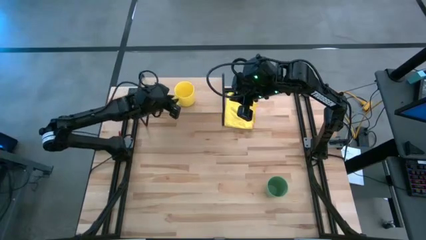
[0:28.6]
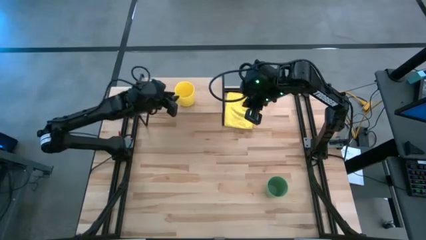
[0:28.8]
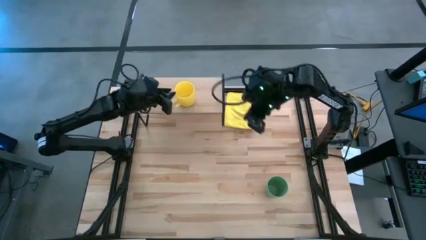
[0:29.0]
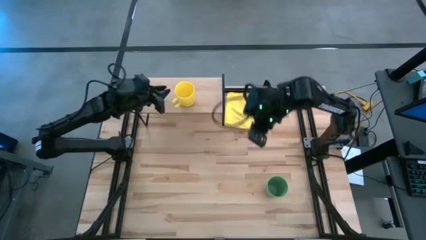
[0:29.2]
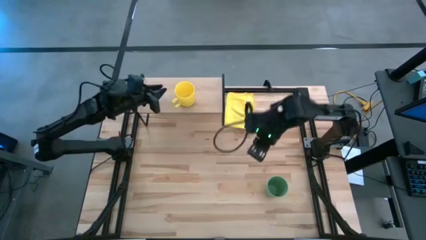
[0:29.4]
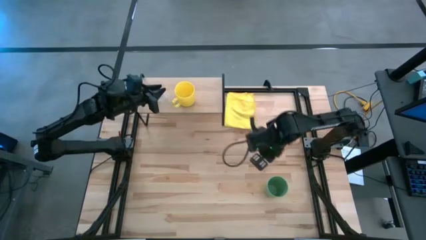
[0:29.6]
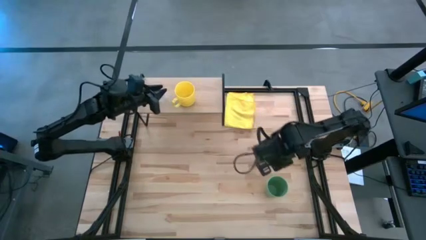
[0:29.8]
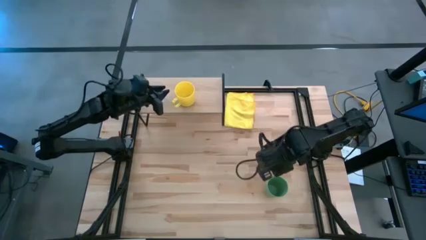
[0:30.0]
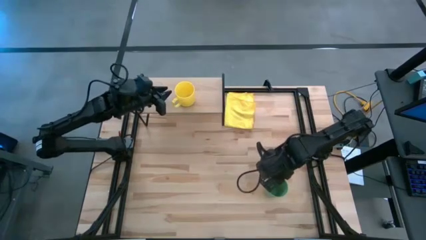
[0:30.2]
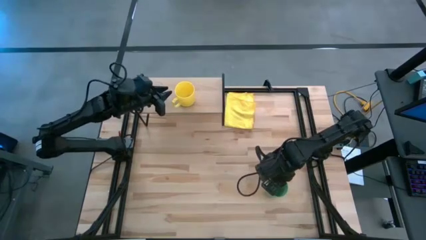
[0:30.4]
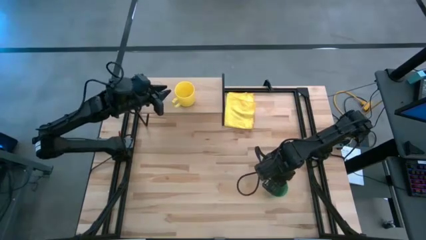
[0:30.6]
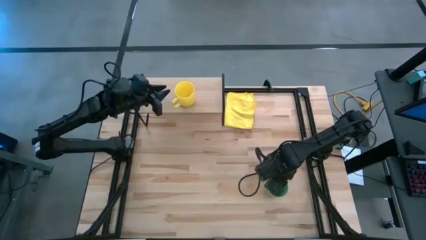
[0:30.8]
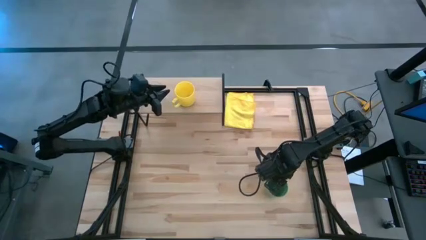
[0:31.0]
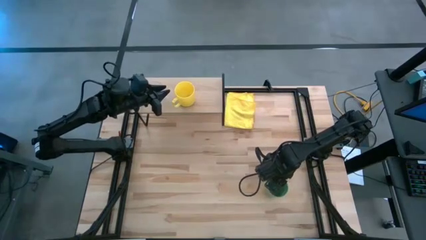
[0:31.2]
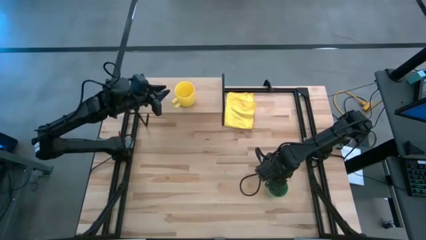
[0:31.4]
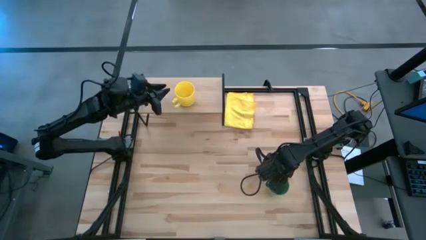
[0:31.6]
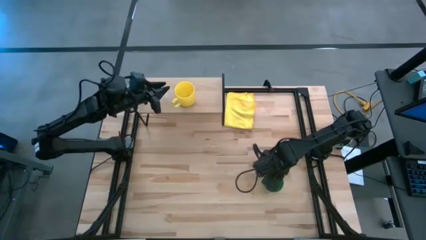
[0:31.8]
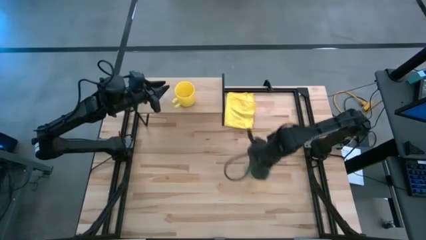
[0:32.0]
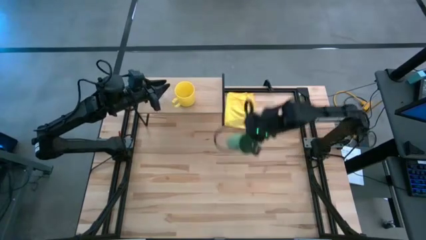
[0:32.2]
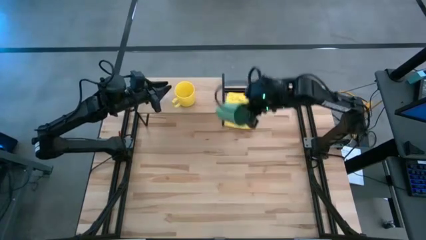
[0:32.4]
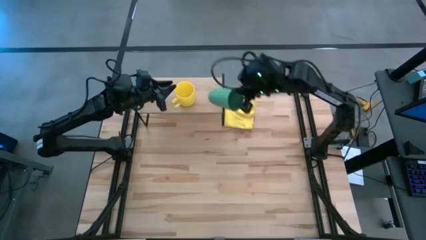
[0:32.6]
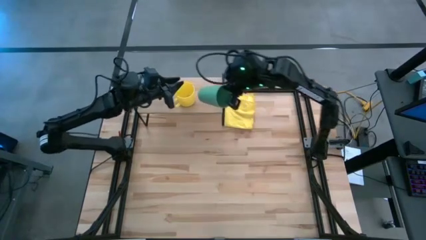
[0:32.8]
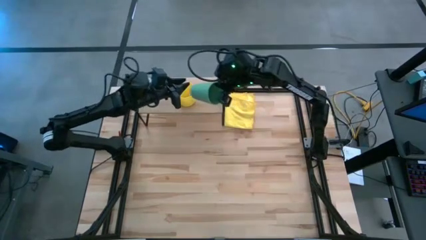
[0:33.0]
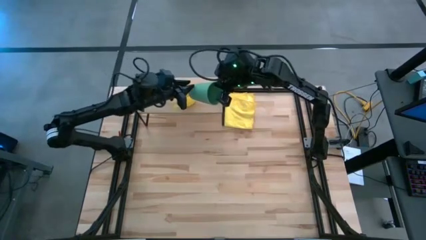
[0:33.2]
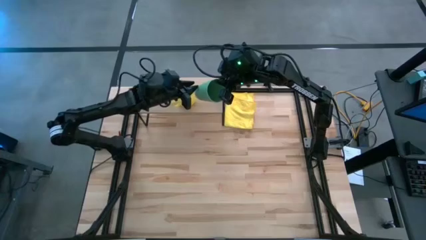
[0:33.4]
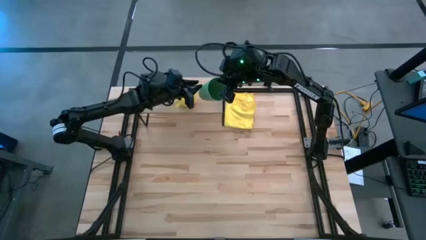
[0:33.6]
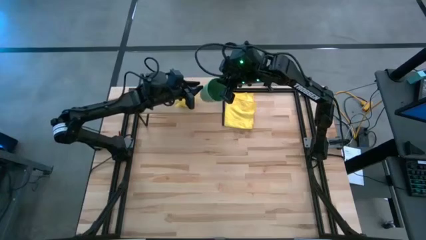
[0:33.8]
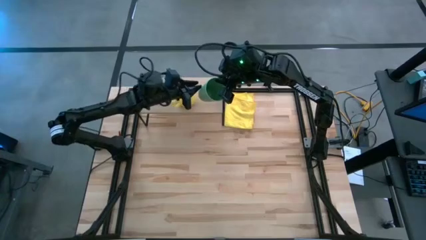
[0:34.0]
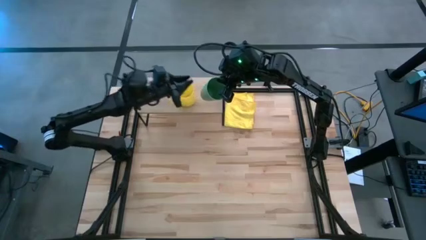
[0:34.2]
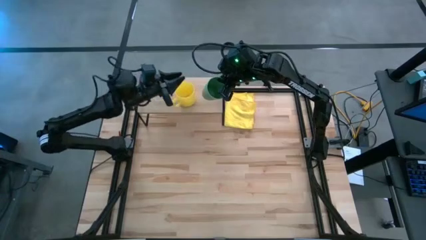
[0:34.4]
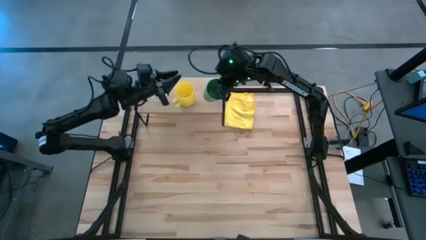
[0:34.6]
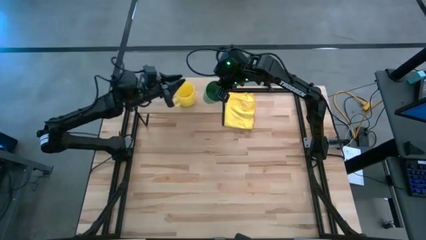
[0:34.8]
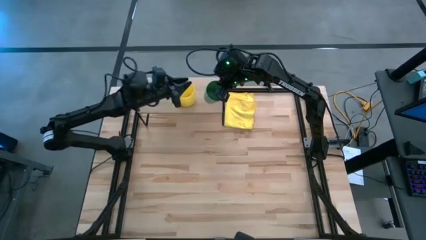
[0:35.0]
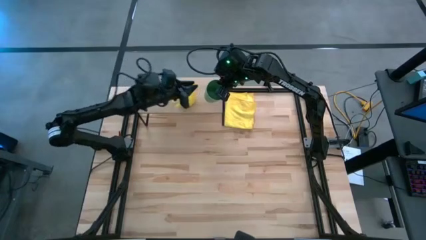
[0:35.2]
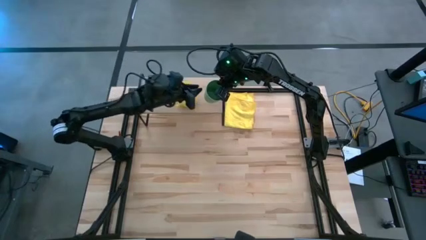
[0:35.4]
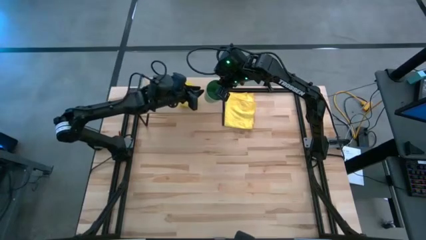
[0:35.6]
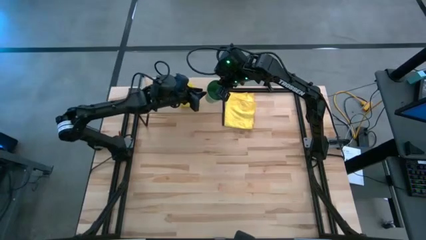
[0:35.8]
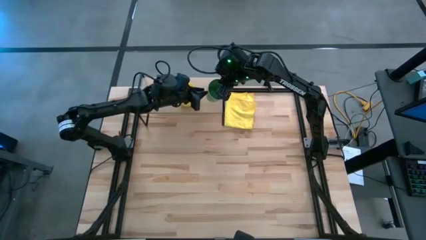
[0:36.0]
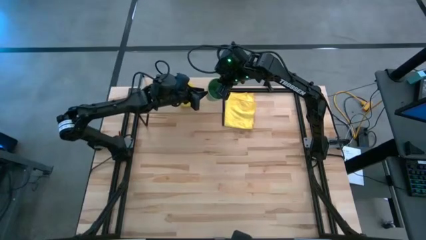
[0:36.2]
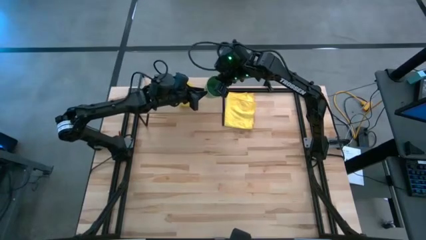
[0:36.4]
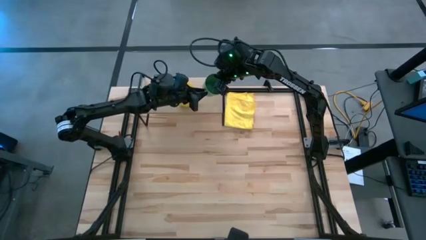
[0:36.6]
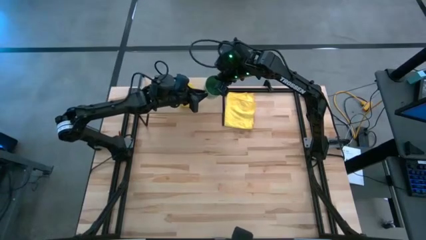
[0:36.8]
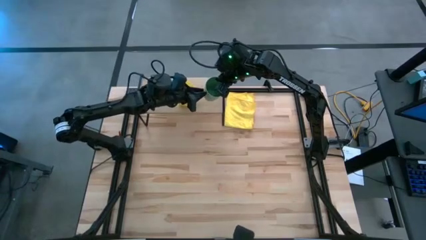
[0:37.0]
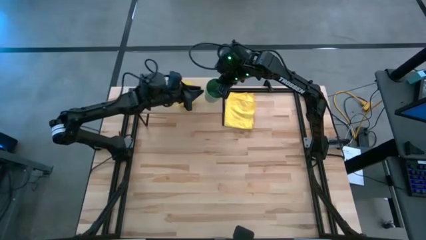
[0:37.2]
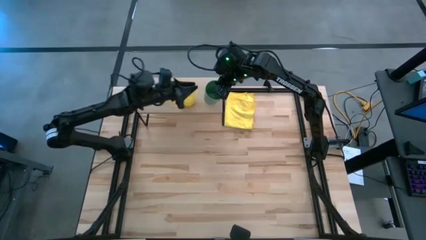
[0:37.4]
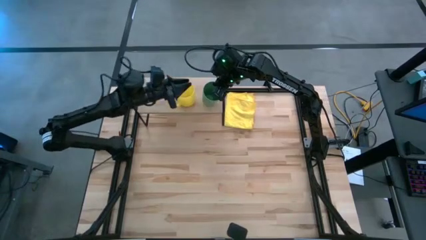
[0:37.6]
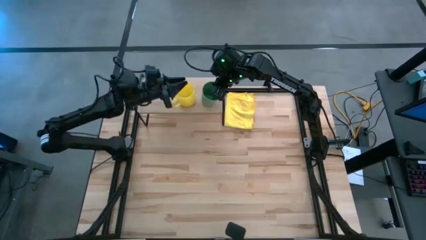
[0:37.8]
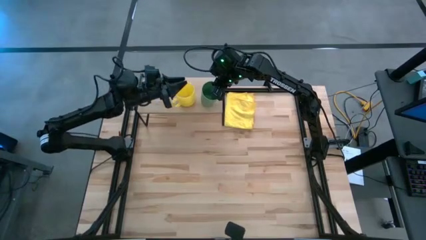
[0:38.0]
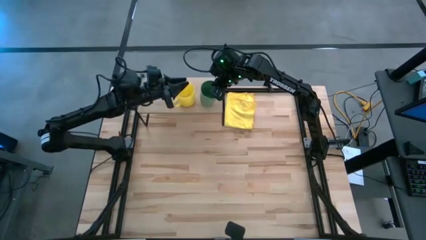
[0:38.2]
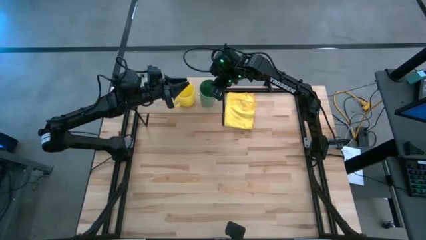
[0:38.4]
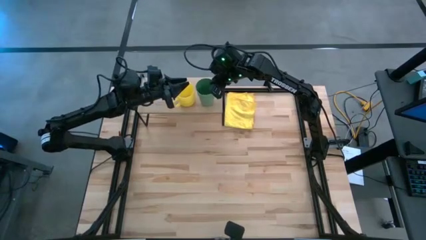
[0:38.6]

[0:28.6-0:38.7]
Task: Stack small to large cups/mugs on shelf
Put the green cup on the shelf
